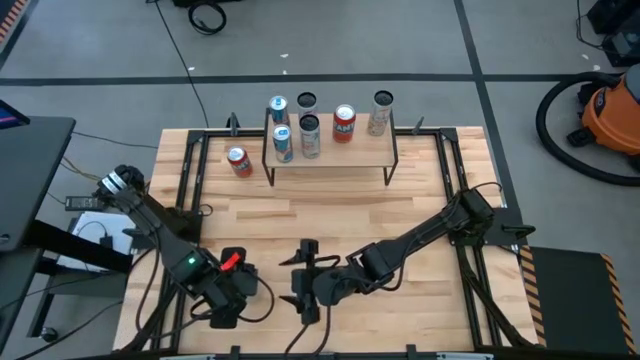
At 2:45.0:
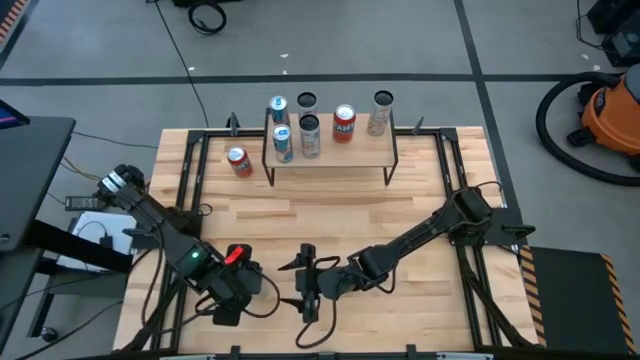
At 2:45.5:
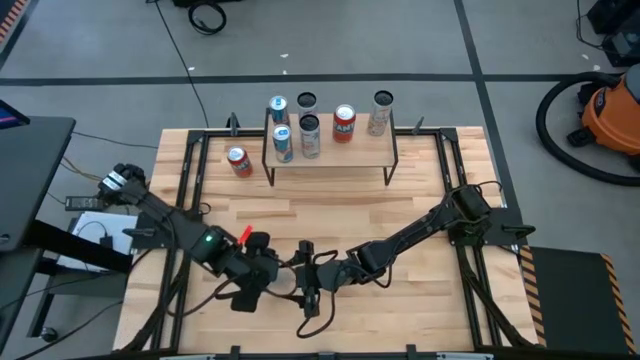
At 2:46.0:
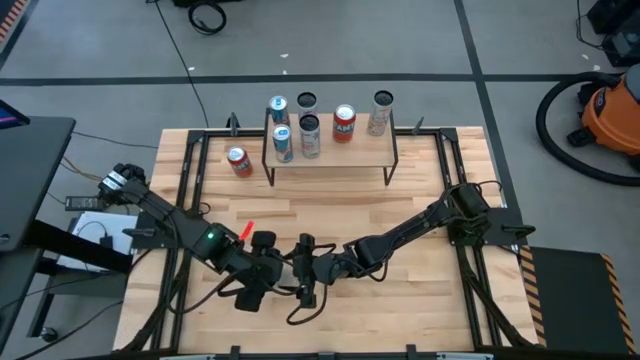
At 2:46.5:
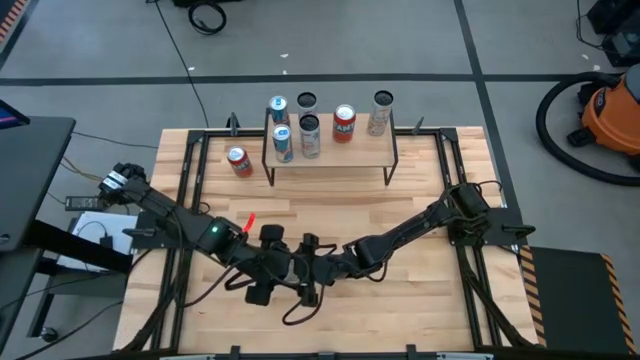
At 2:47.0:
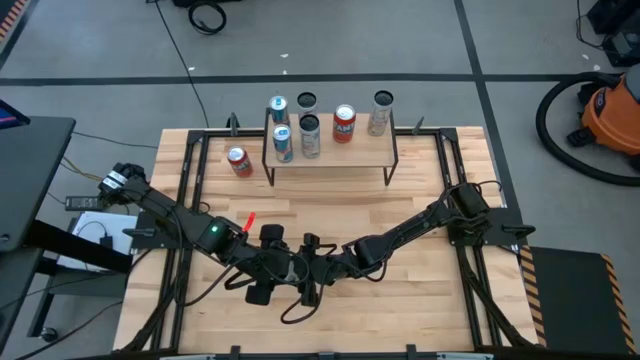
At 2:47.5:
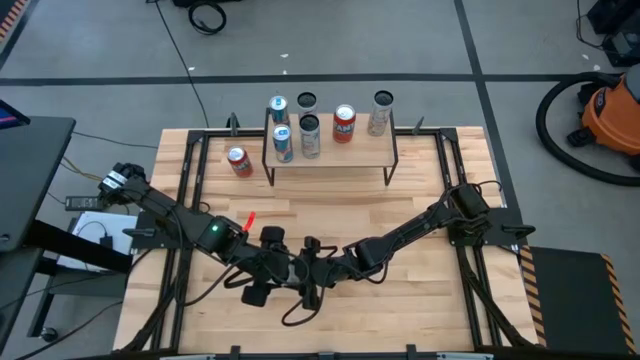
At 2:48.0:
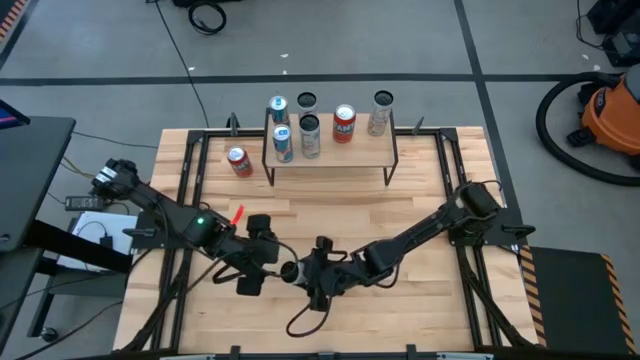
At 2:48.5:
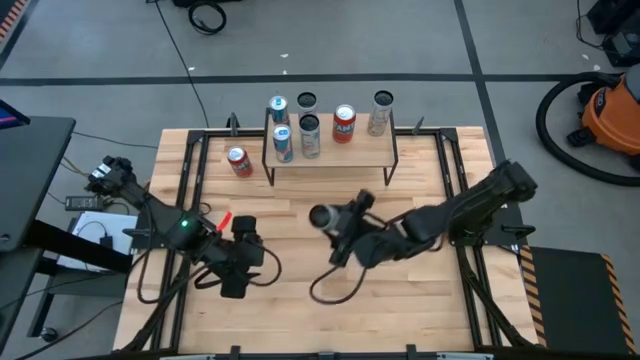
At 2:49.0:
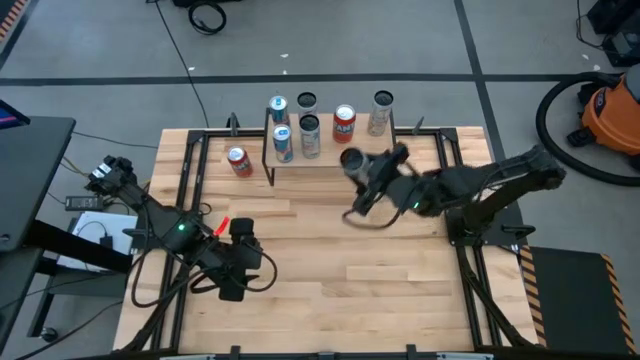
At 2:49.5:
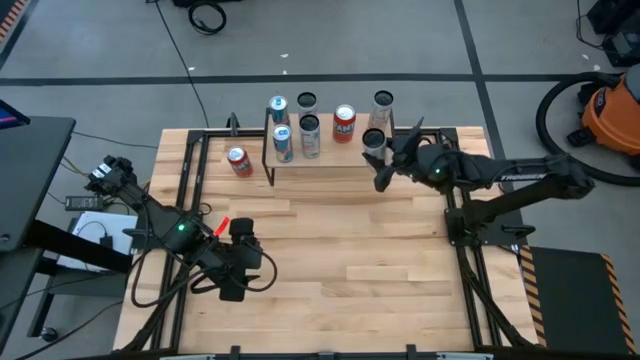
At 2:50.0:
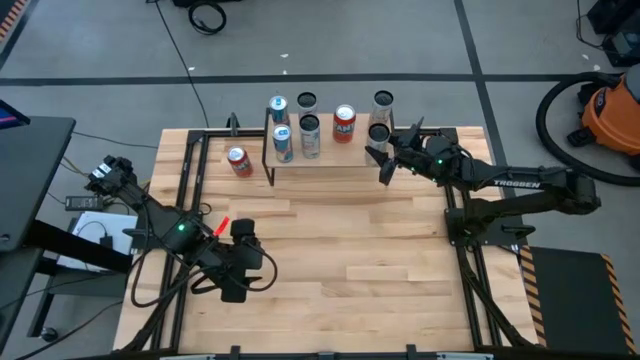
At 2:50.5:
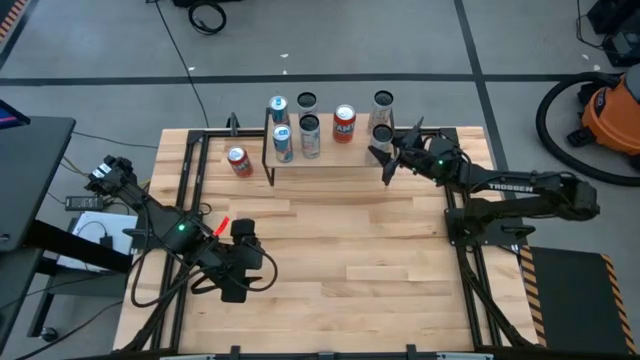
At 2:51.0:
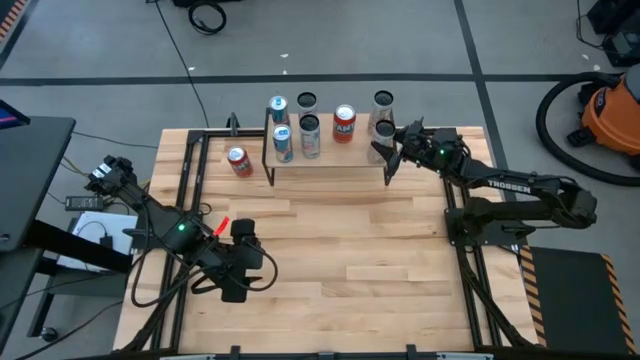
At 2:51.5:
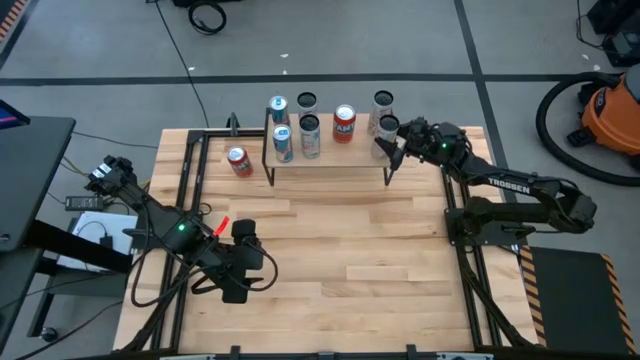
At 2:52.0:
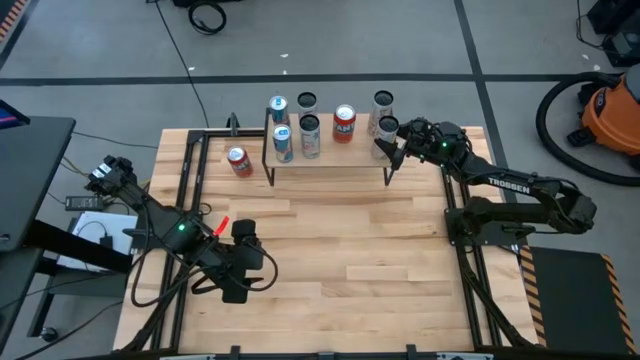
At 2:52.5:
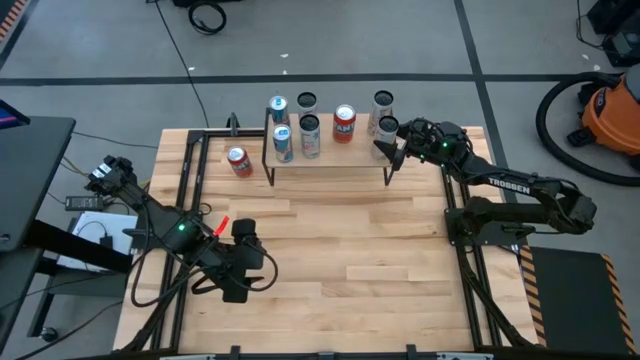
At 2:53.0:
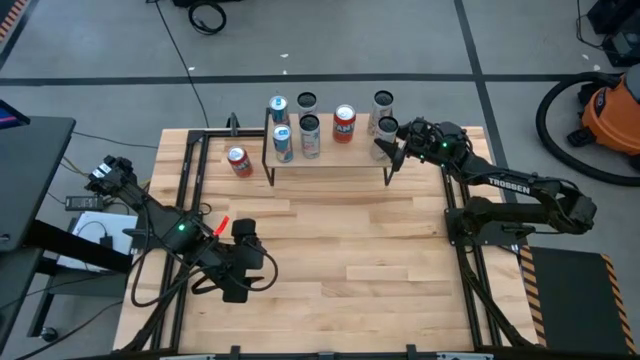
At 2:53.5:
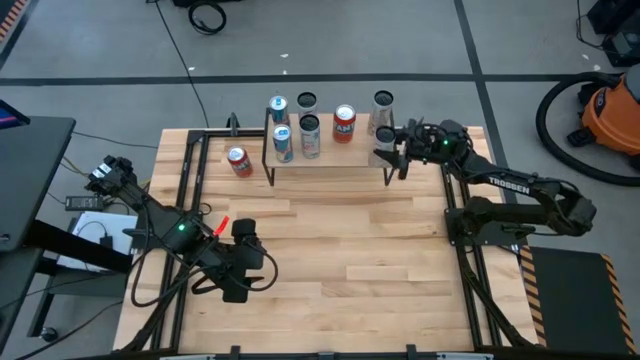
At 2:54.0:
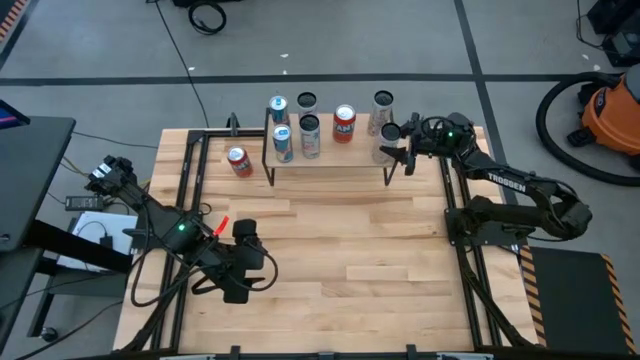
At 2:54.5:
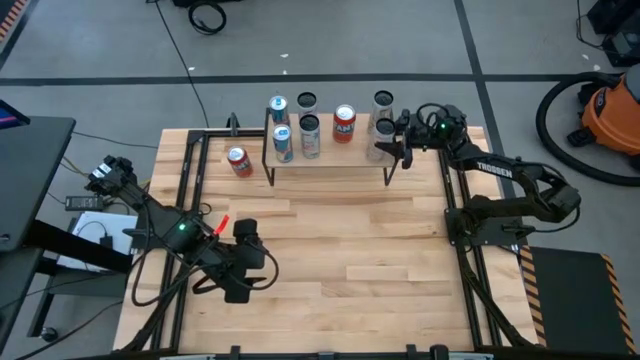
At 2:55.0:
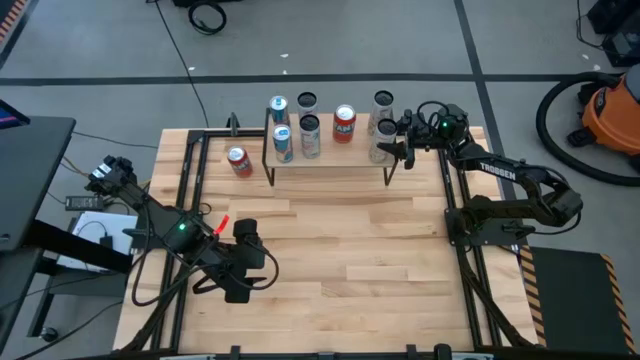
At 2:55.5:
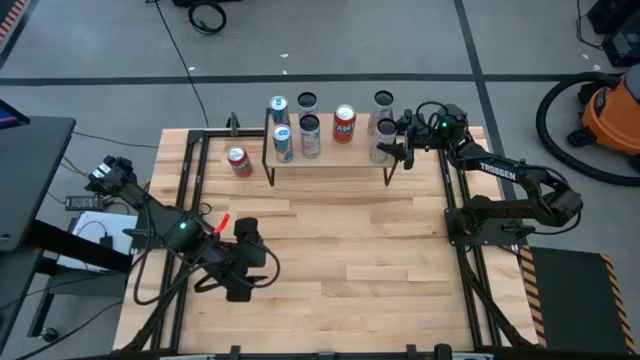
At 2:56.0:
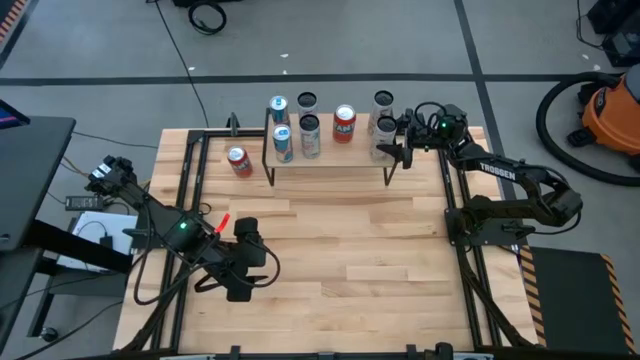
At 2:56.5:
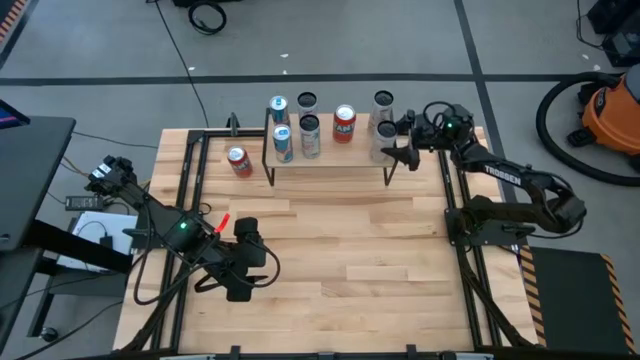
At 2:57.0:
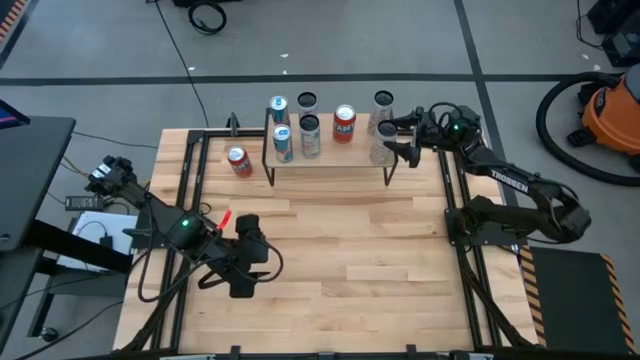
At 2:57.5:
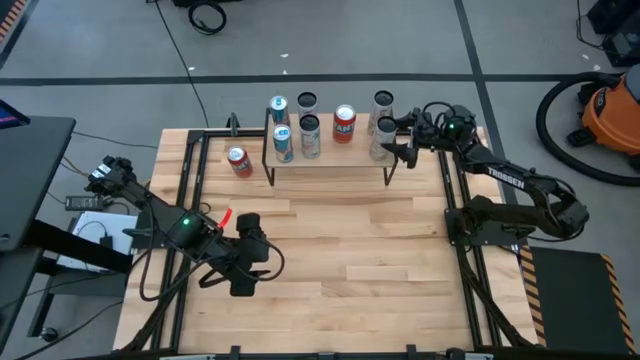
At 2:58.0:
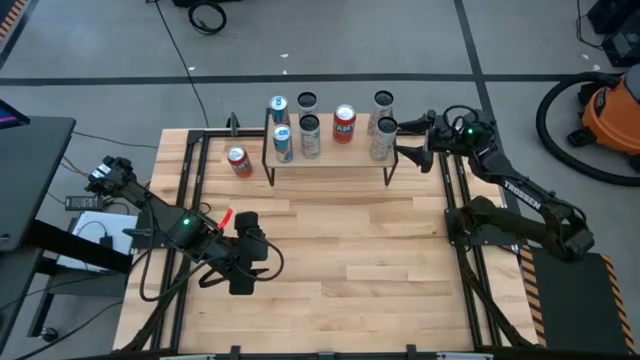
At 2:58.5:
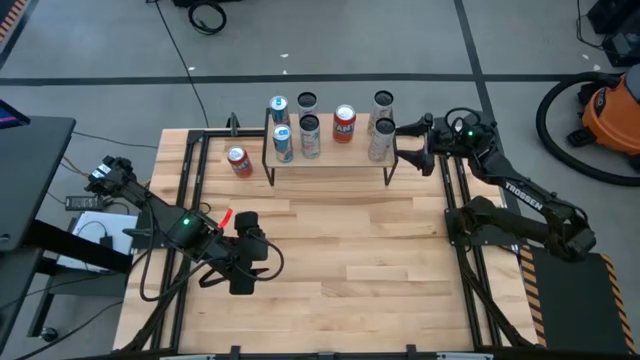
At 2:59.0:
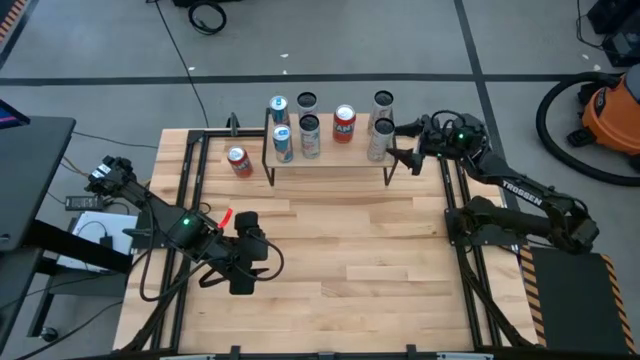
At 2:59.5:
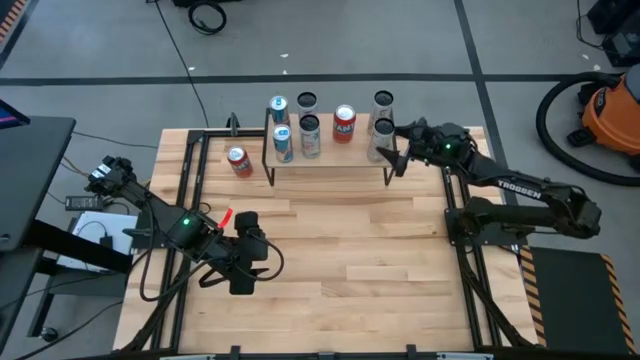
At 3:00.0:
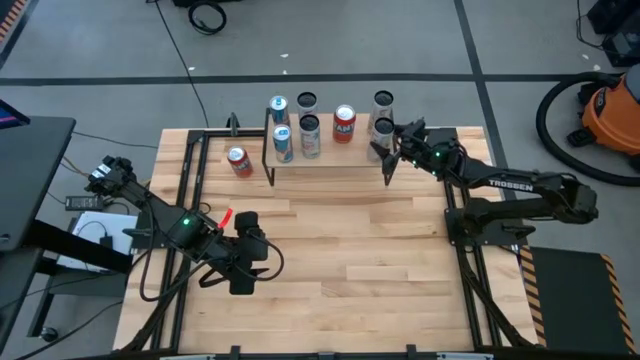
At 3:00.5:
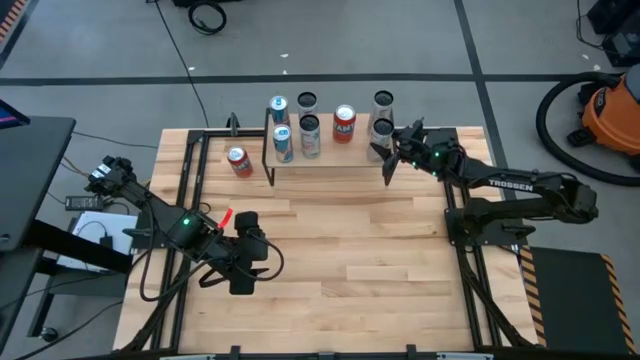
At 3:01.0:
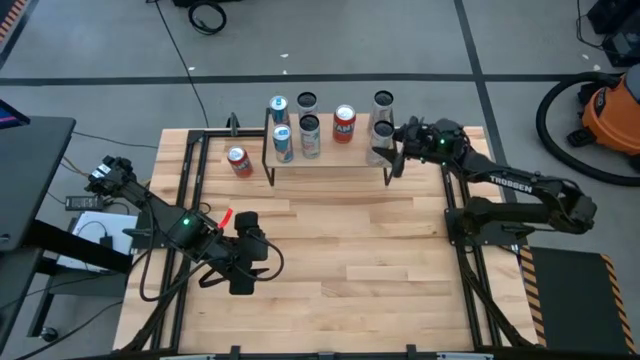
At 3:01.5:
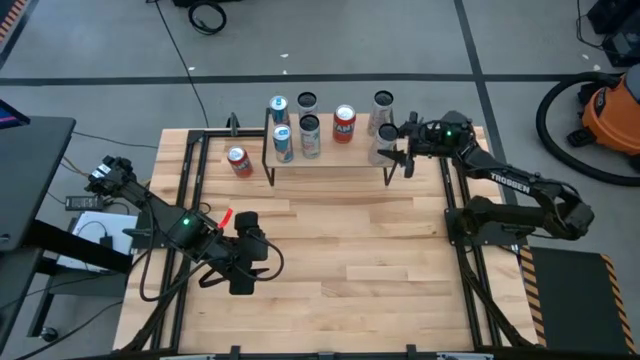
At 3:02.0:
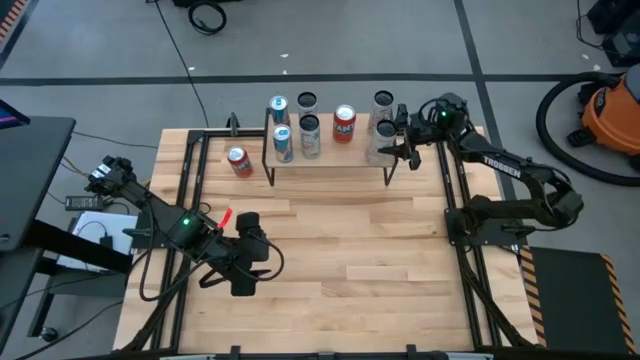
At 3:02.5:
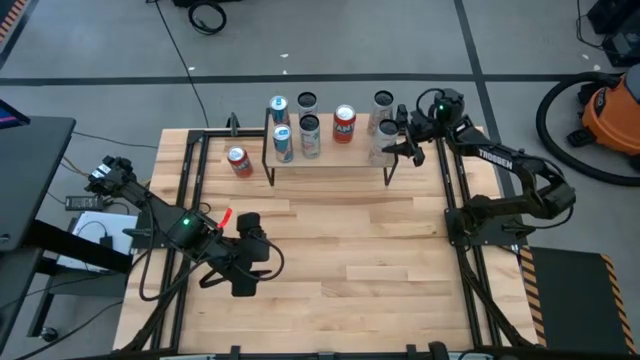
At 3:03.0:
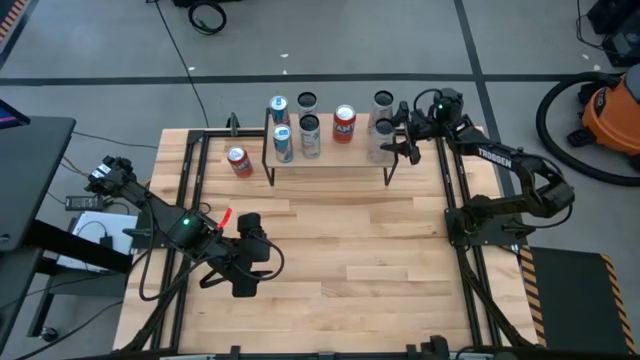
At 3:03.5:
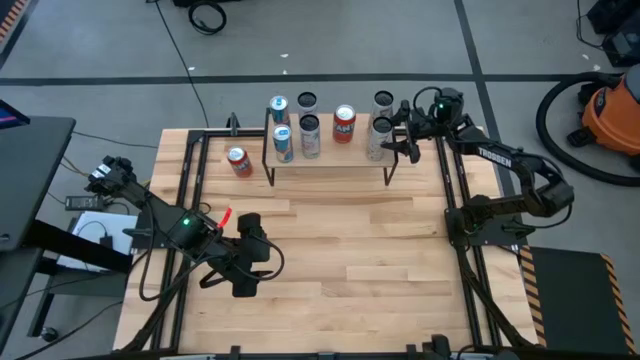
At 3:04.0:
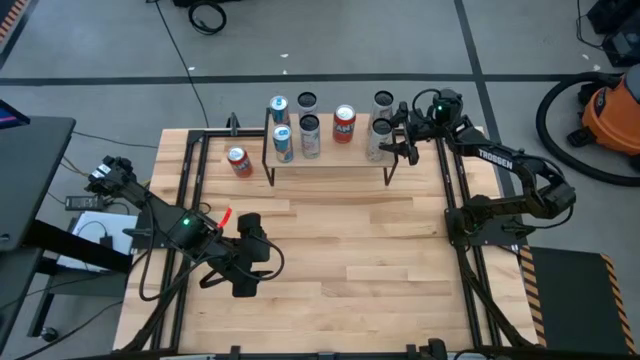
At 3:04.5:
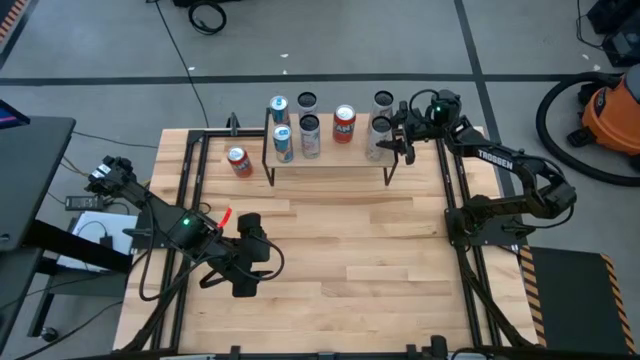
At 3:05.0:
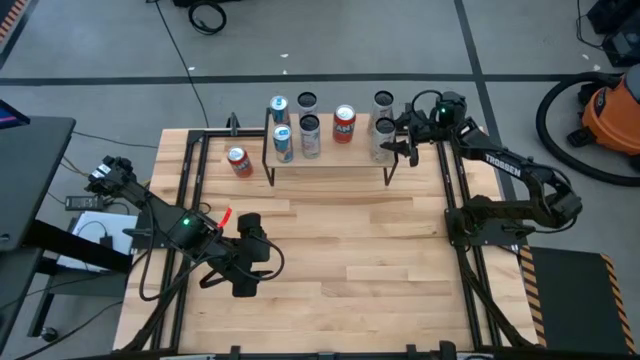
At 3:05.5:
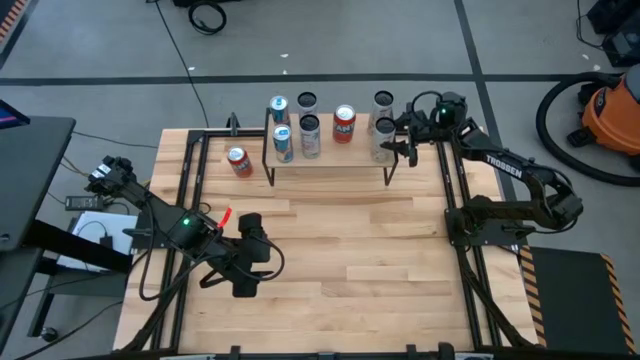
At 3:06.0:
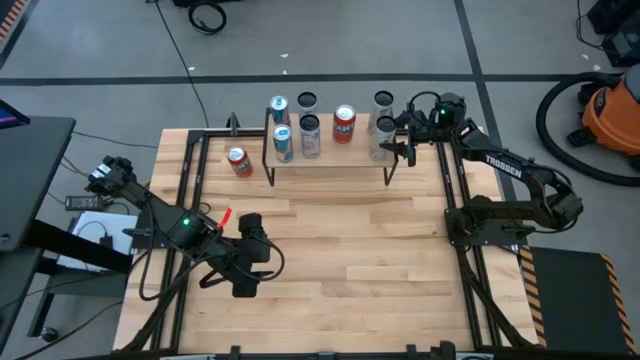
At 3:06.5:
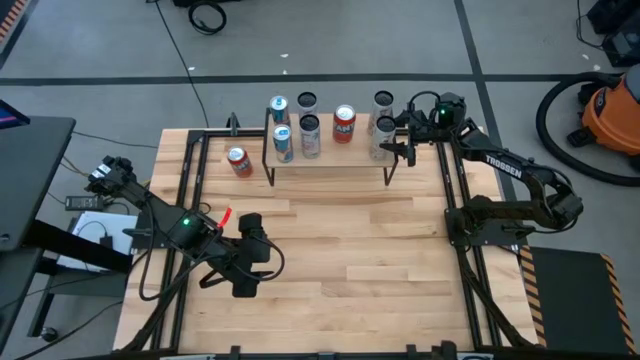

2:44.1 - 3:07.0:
Task: Place canned beverage on shelf
Put the white yellow soda can on the shelf aligned with the other white yellow soda can
